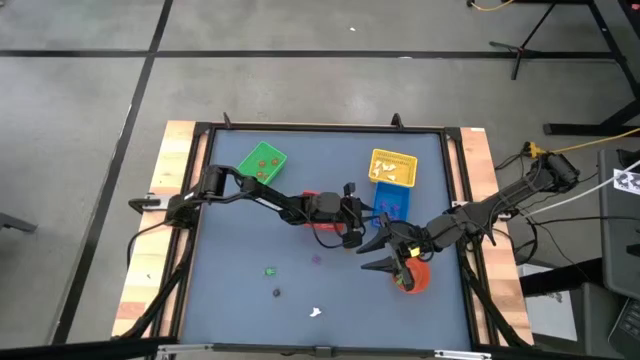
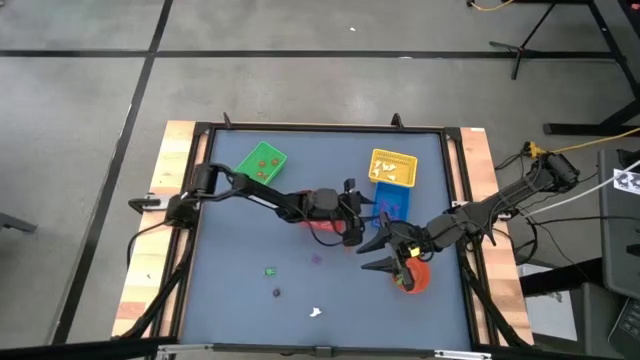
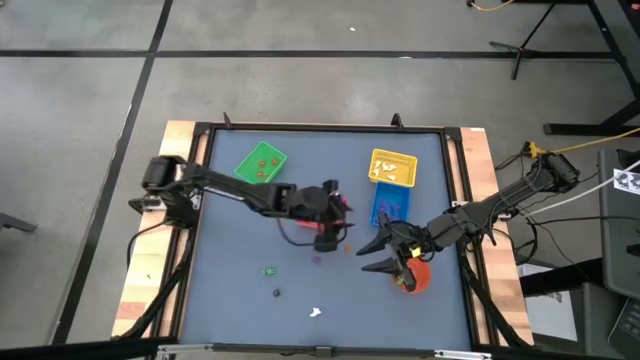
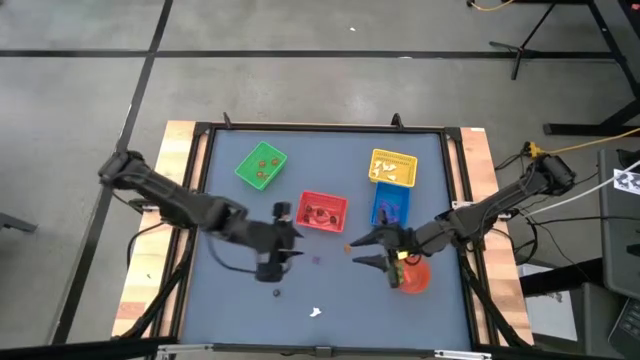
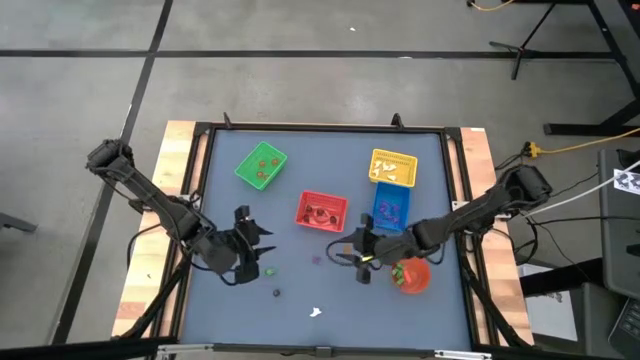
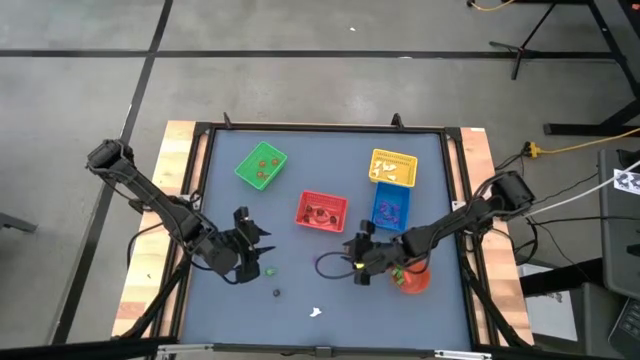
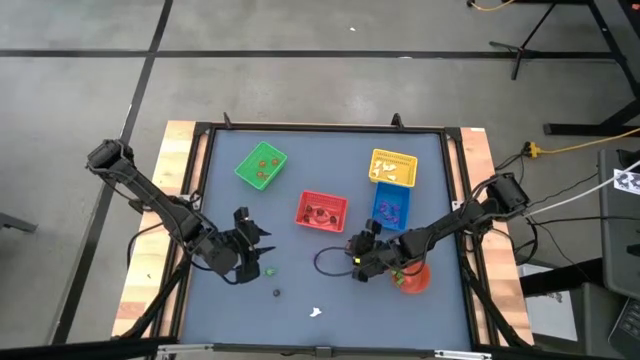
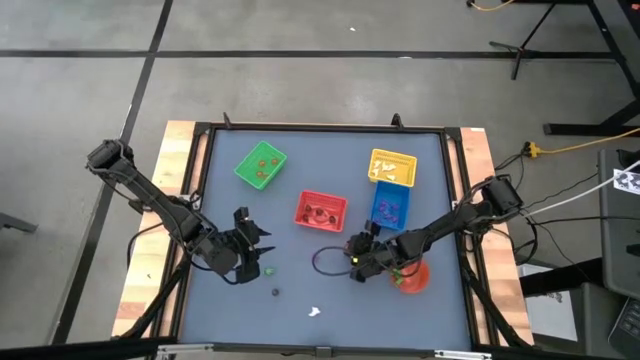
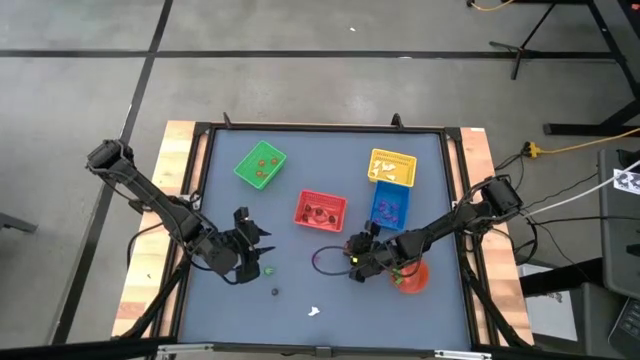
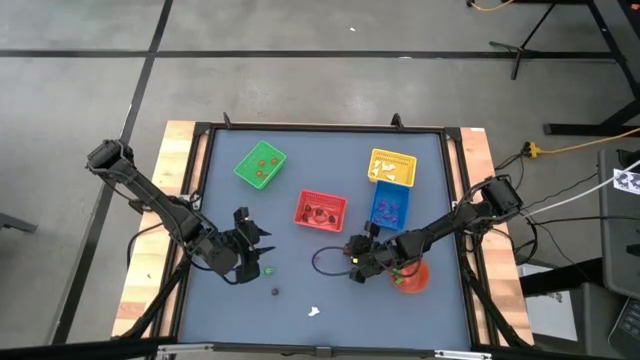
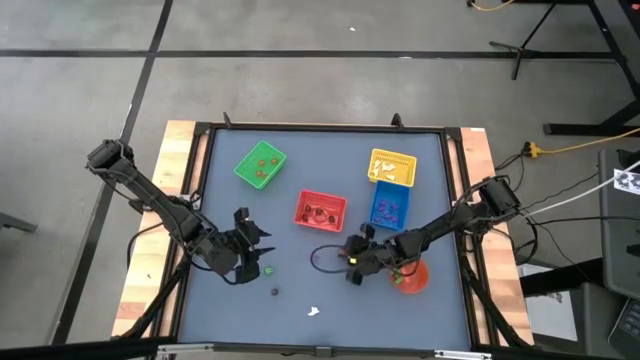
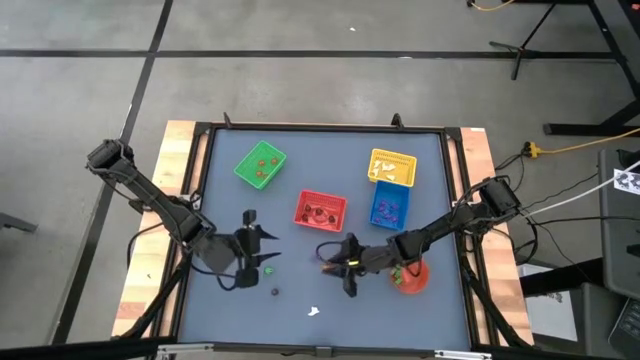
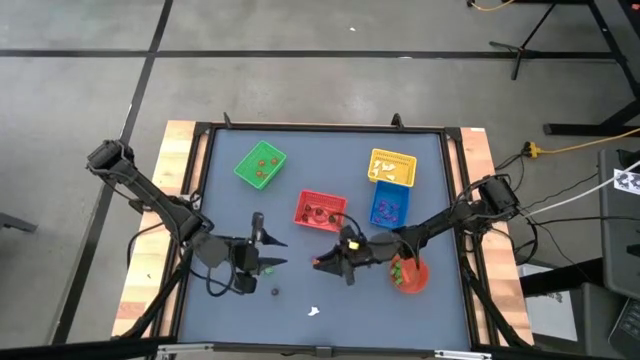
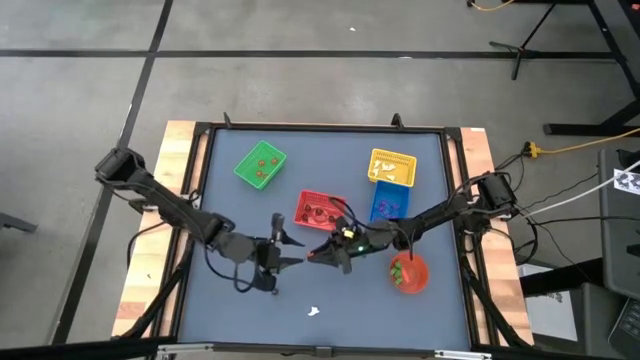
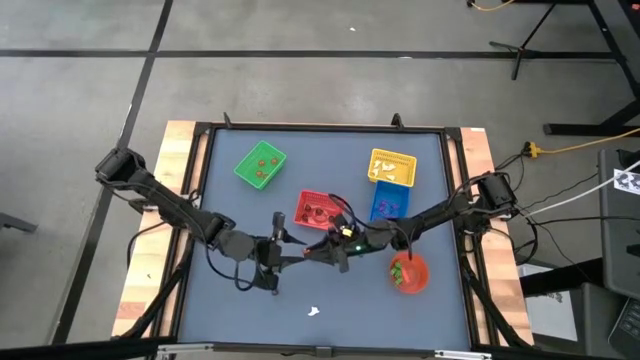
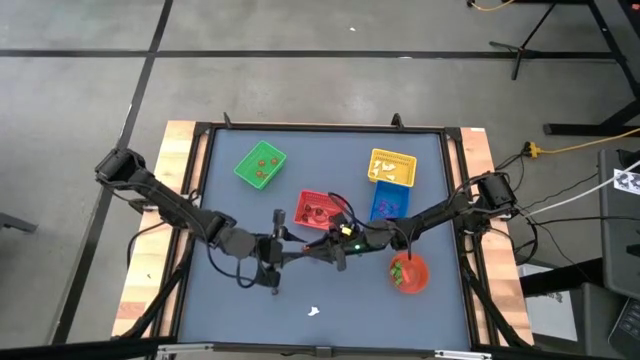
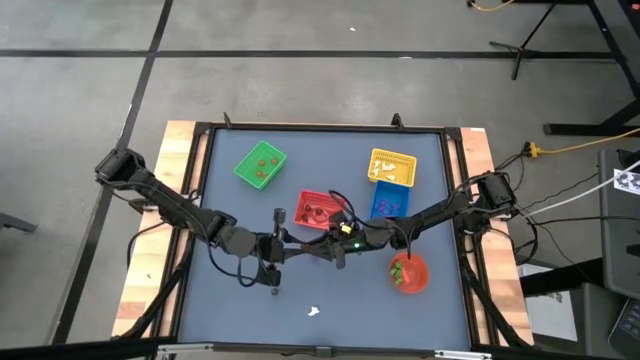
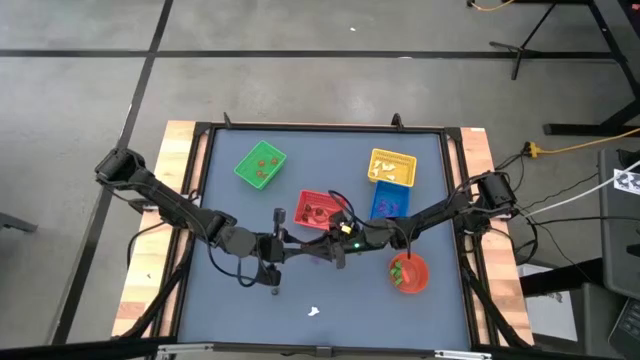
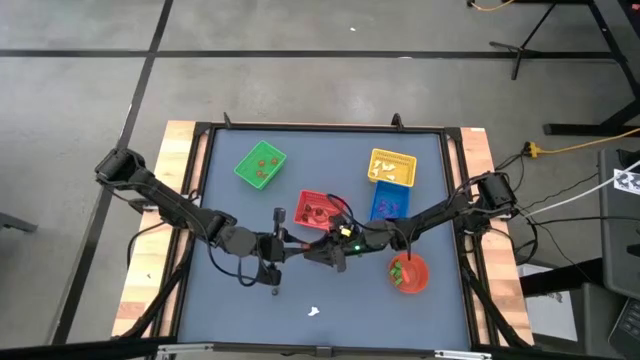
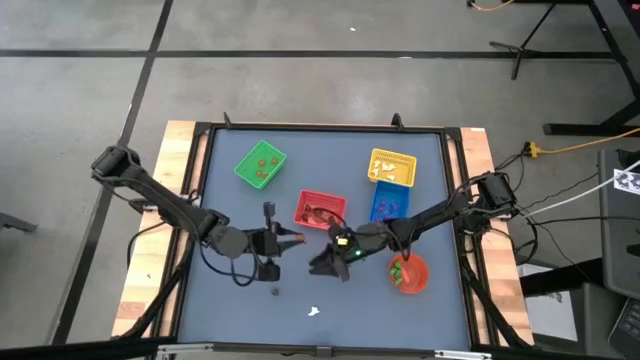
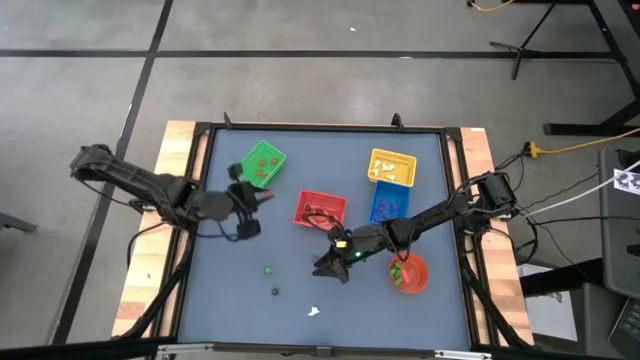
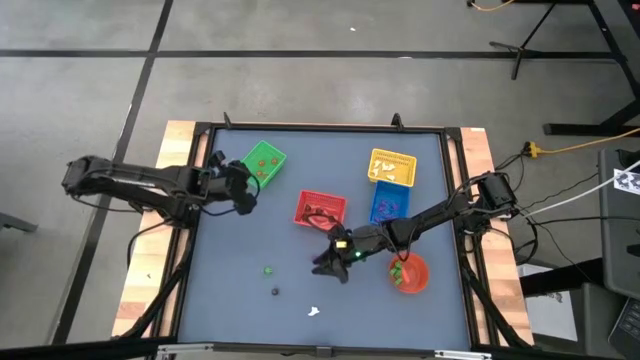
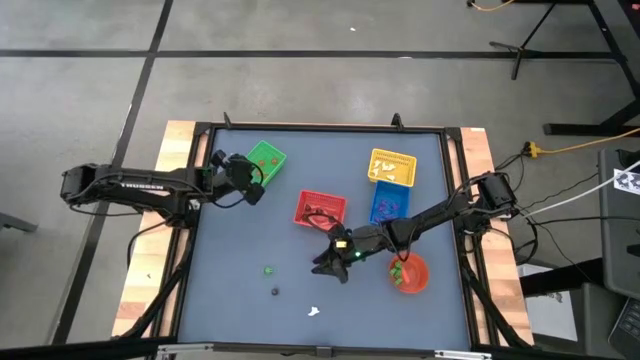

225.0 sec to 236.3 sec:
Task: Sort Halloween decoration
Put the orange pumpkin toy into the green bin

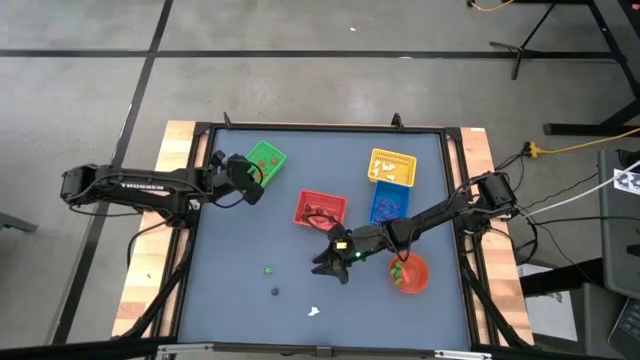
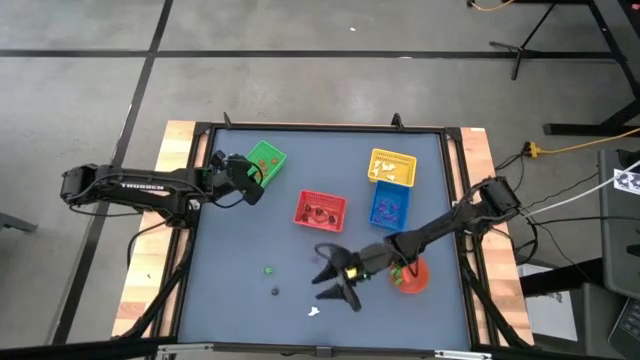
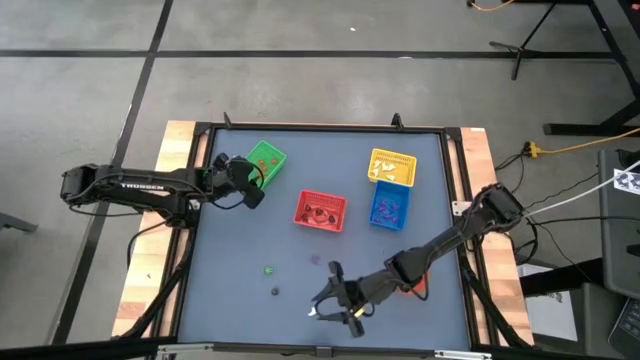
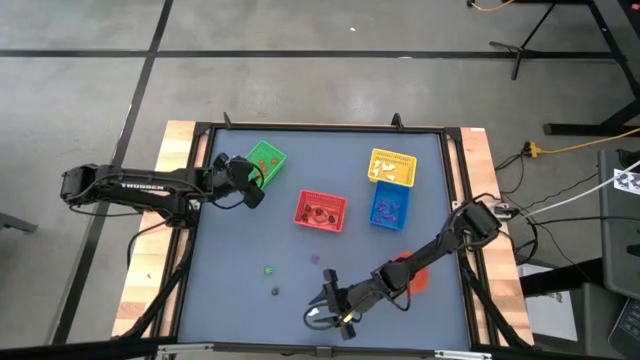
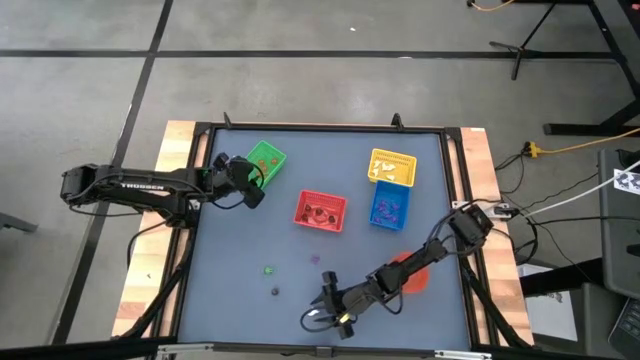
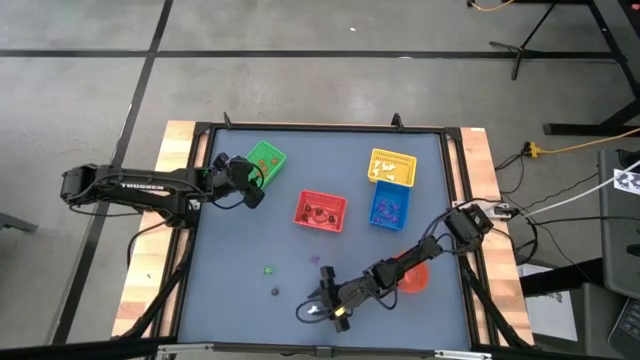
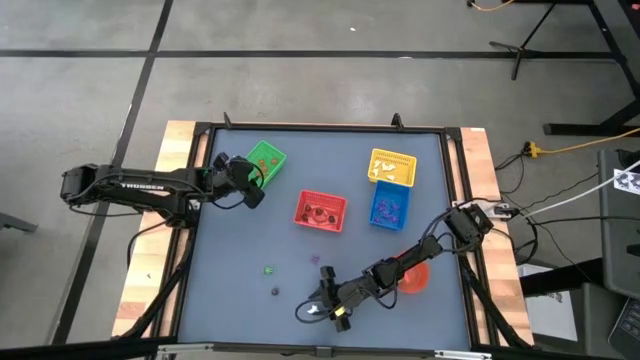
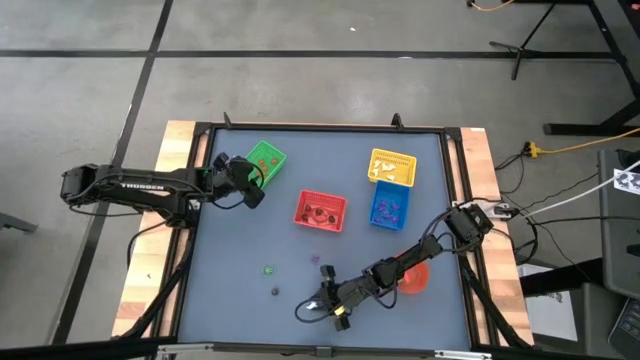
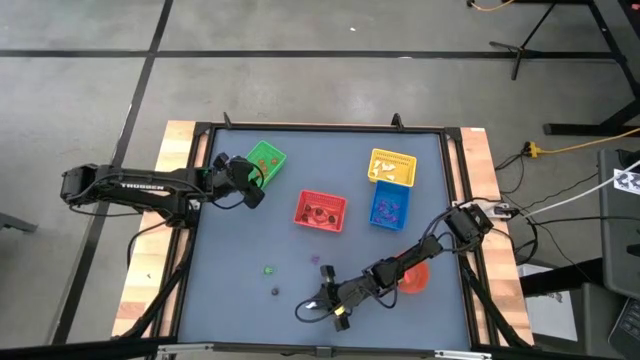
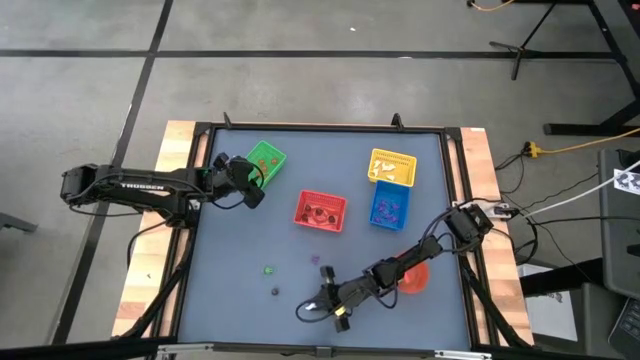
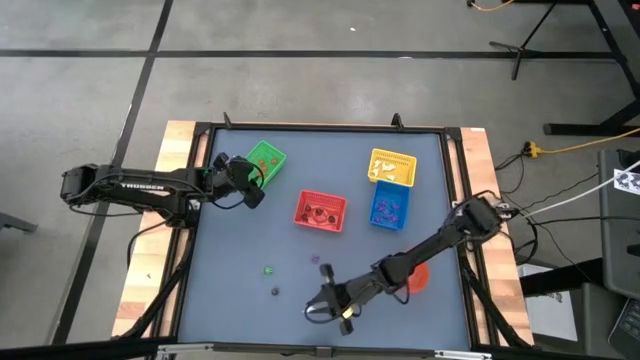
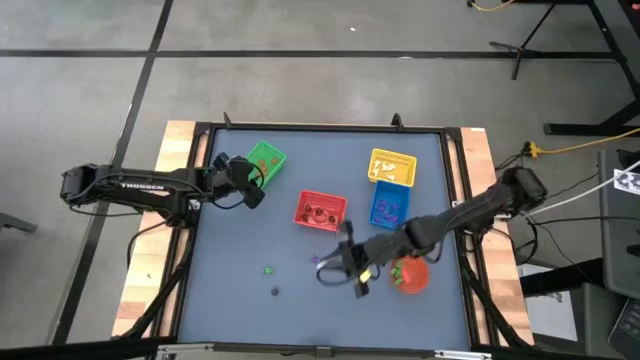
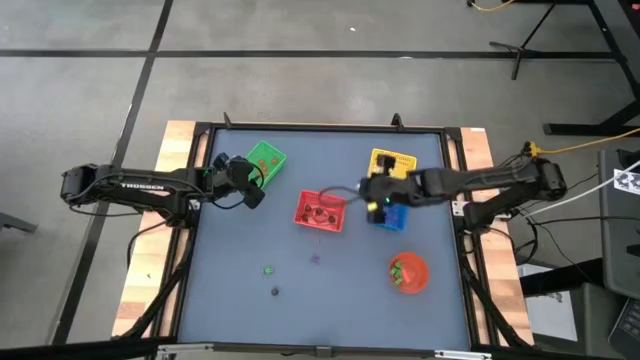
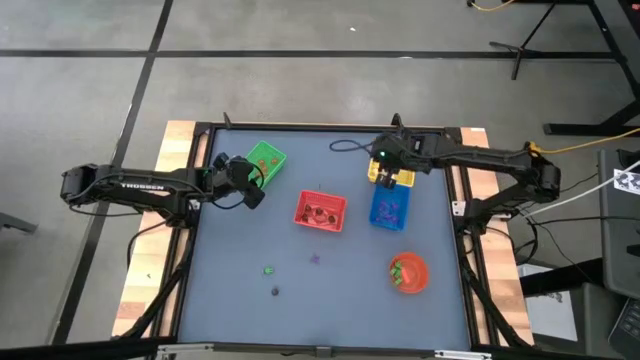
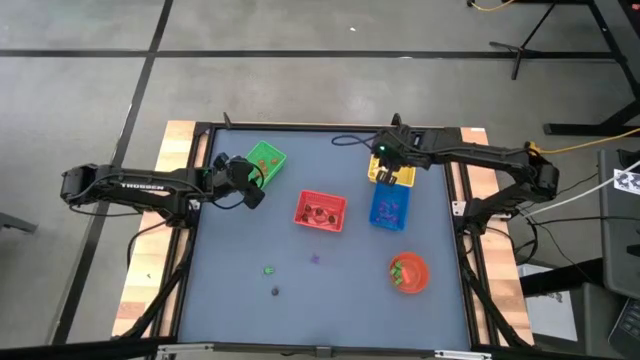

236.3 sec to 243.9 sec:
Put the white ghost toy into the yellow bin

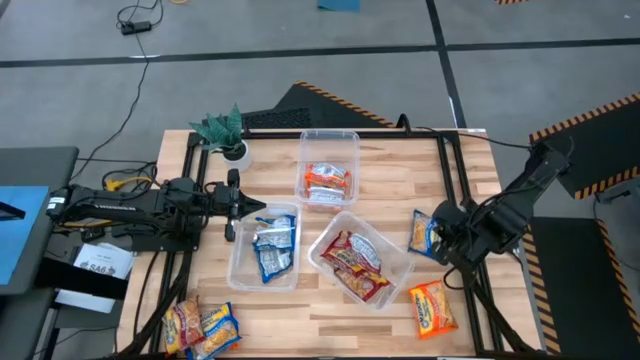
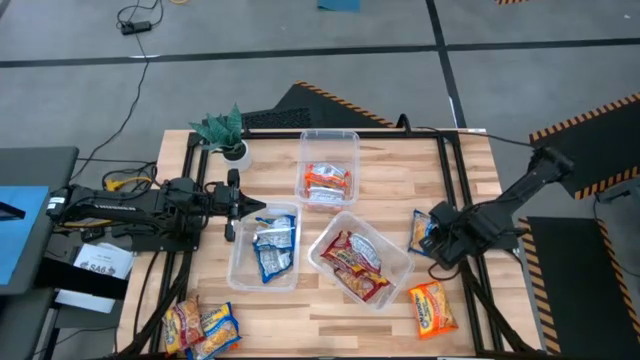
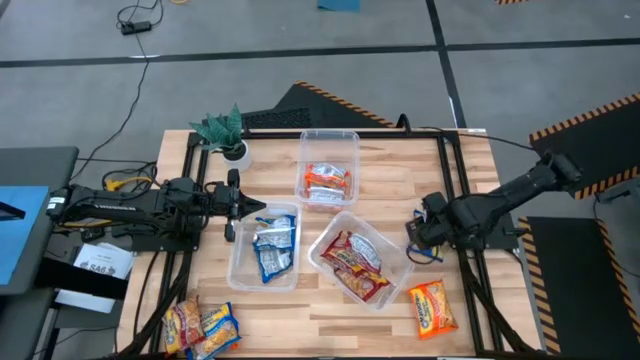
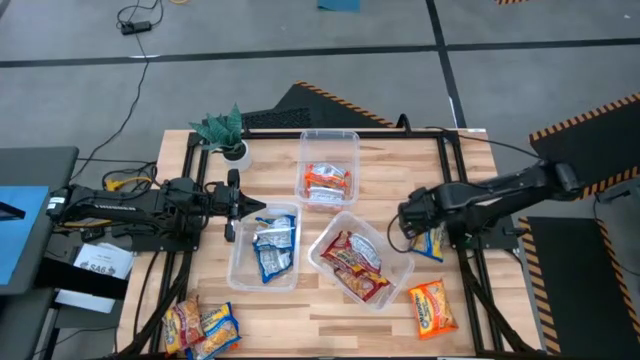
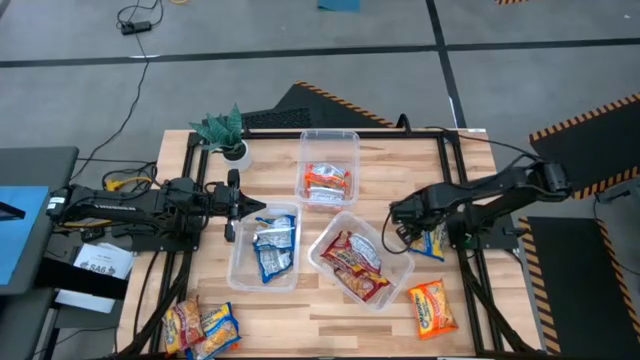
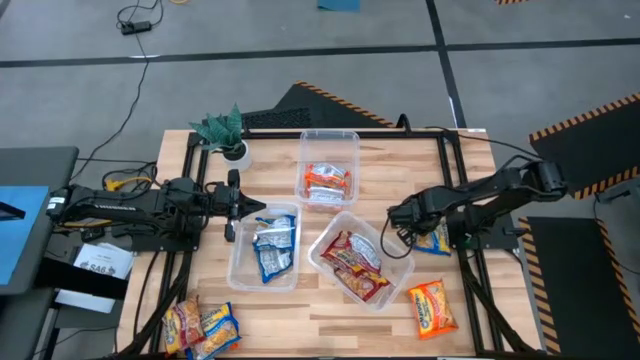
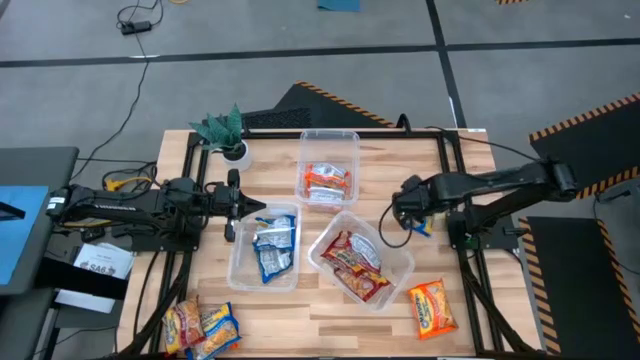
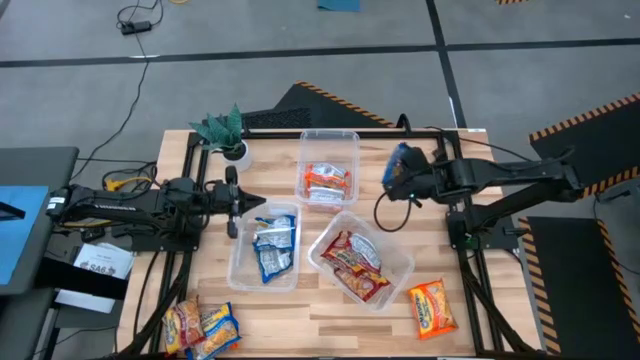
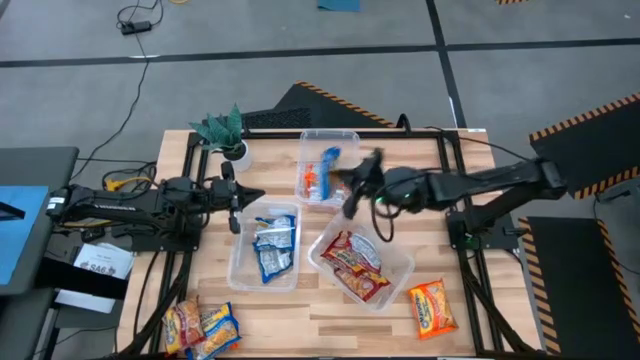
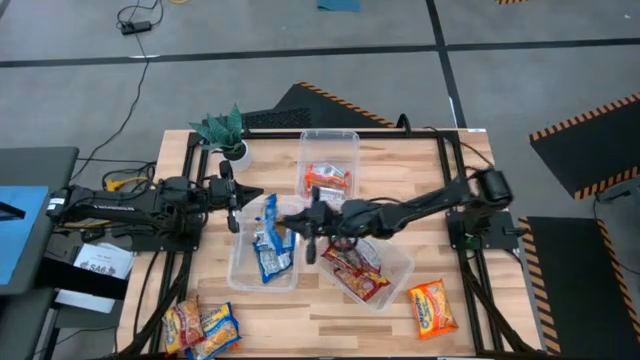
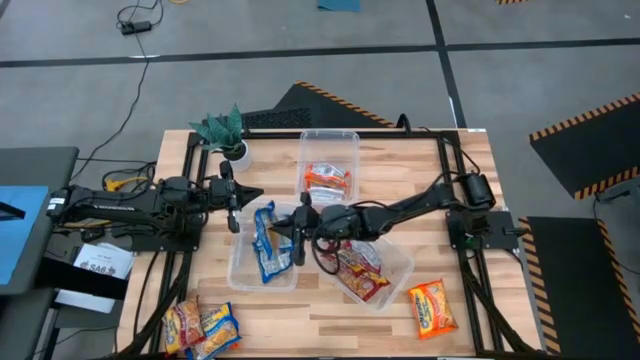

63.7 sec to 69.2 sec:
Task: Sort Maruchan noodles
Put the blue noodle pack into the bottom left transparent bin
